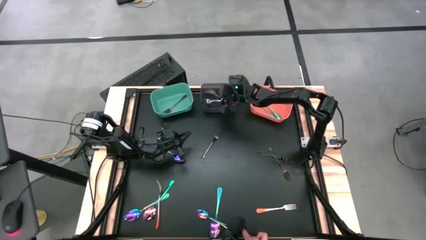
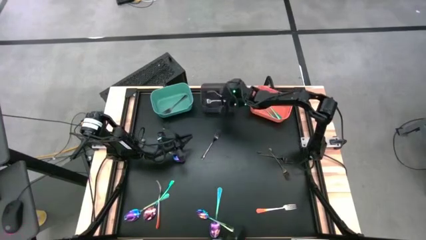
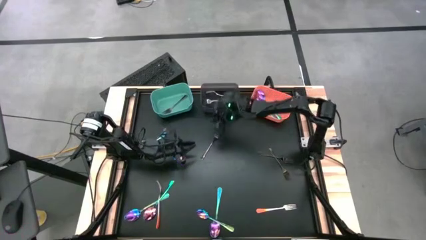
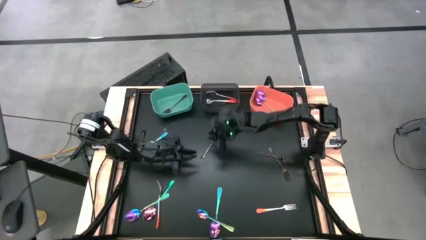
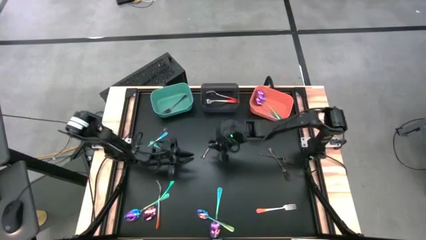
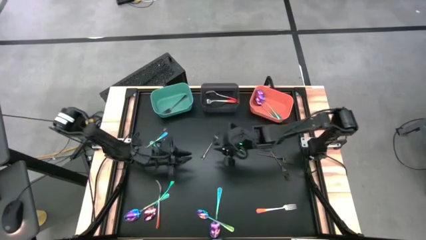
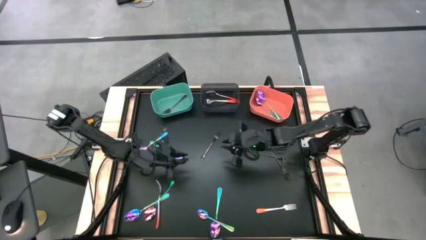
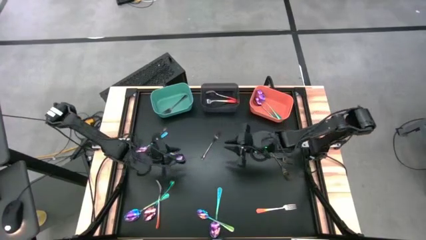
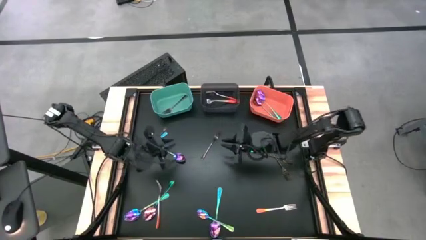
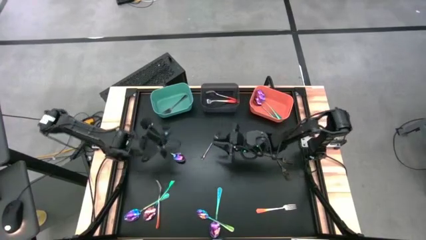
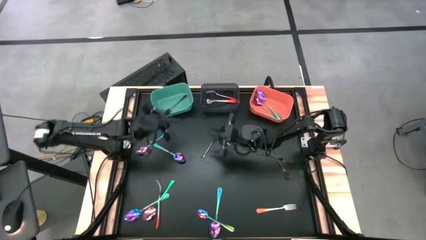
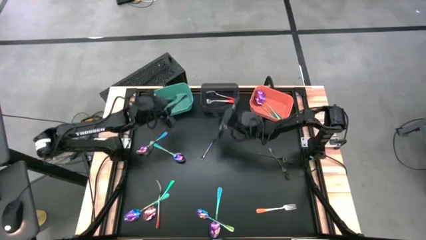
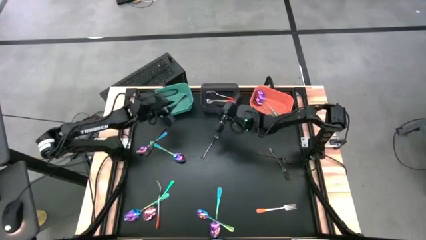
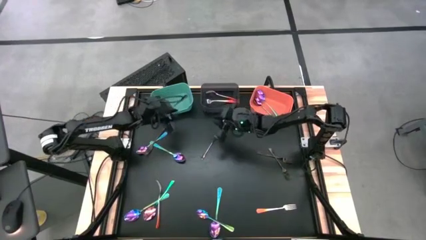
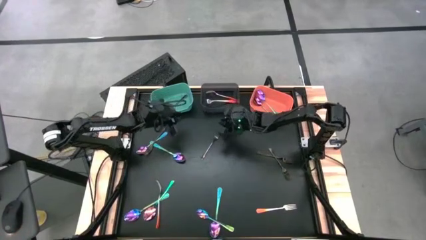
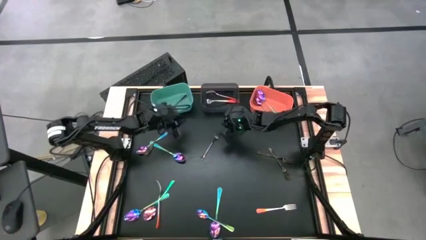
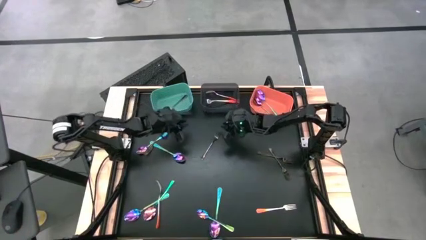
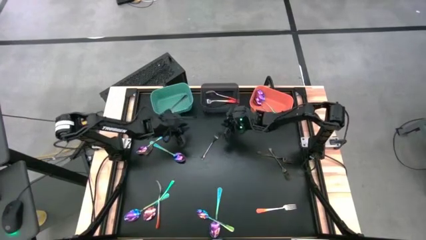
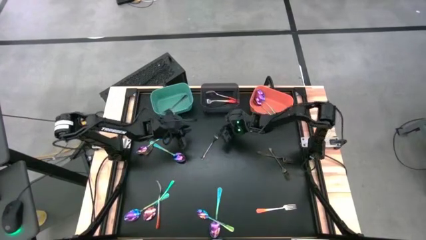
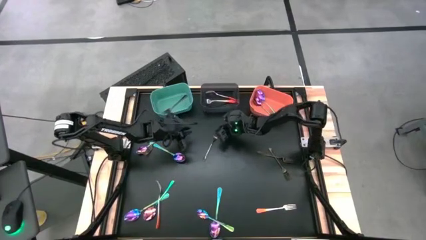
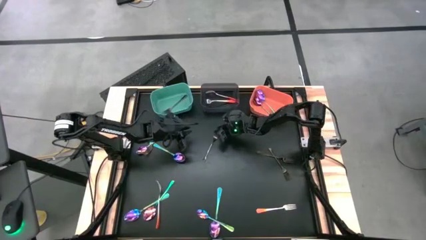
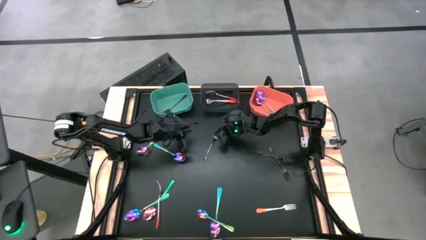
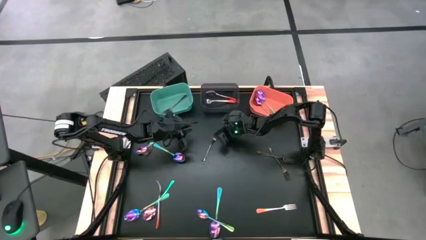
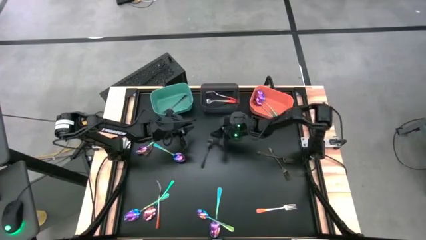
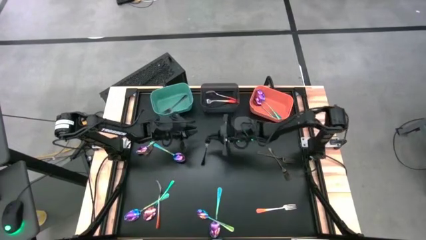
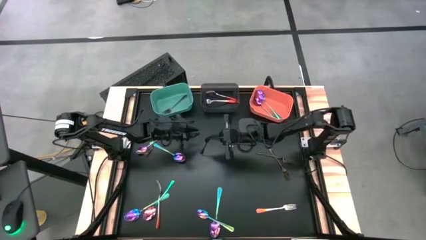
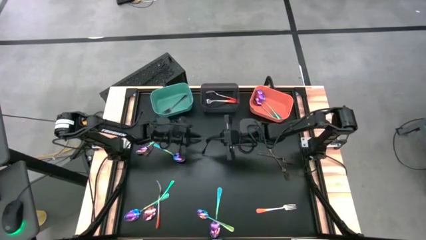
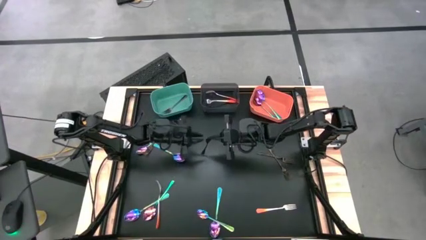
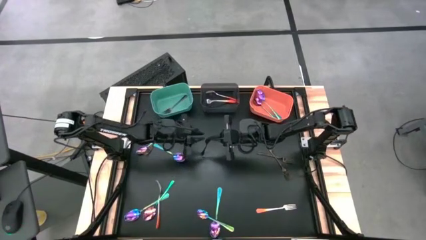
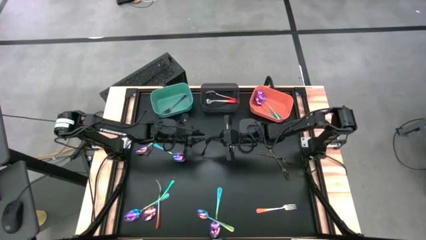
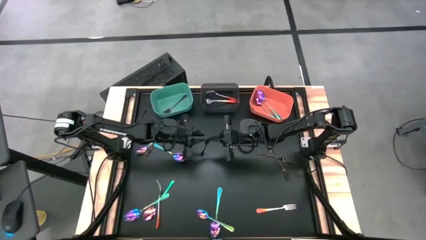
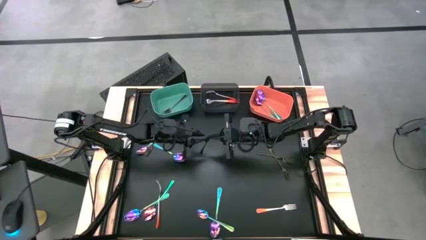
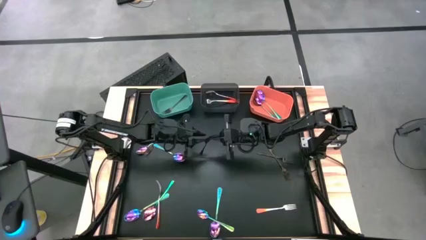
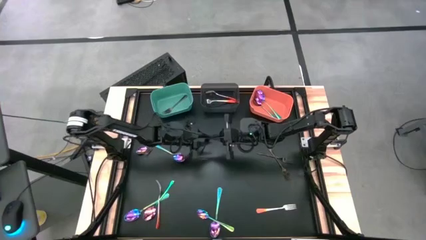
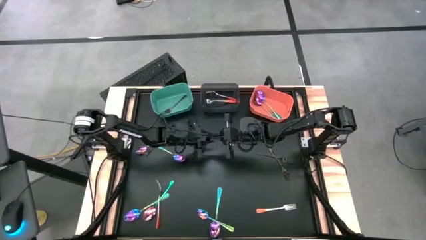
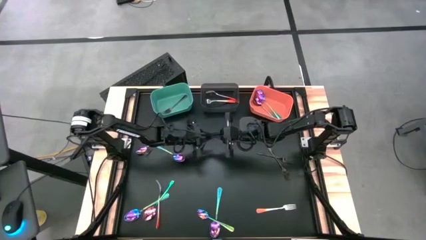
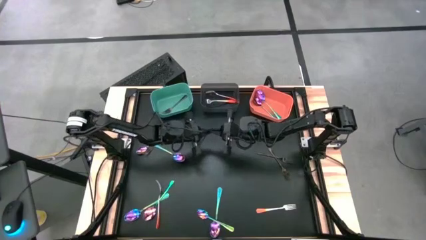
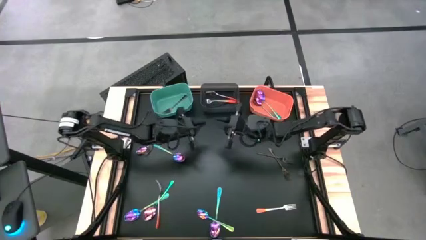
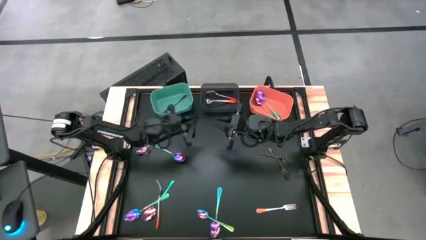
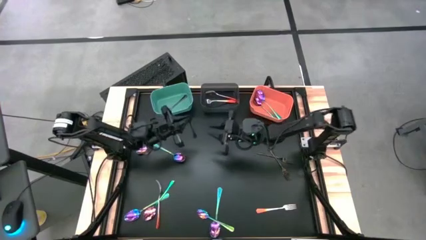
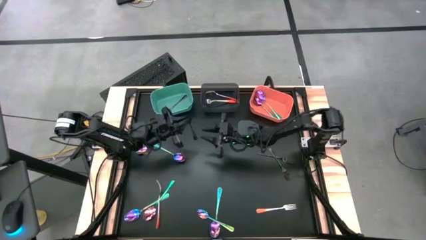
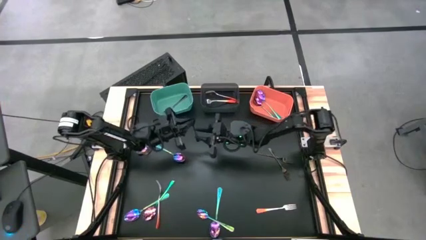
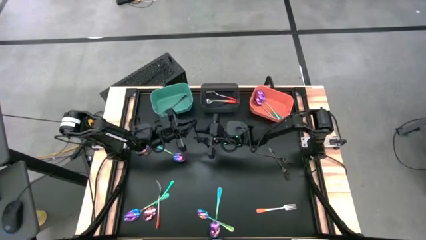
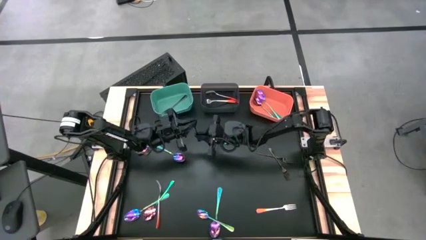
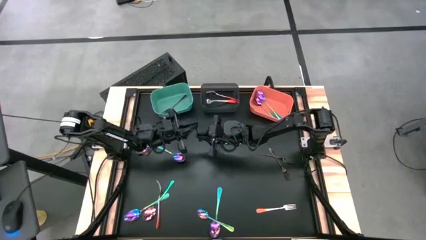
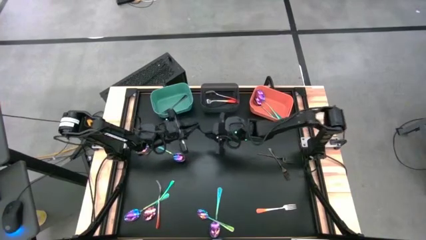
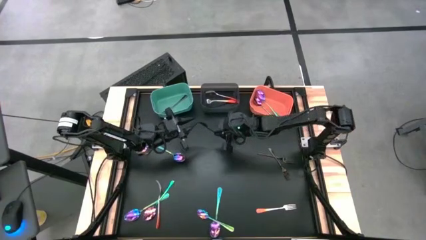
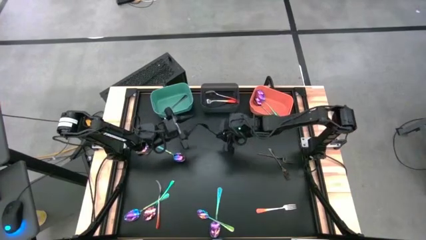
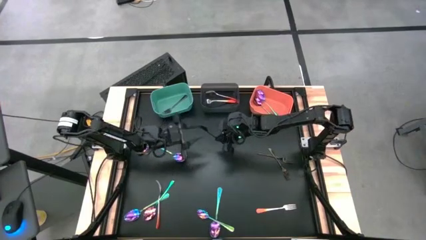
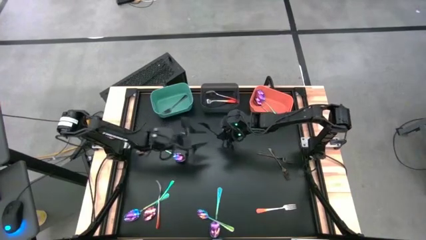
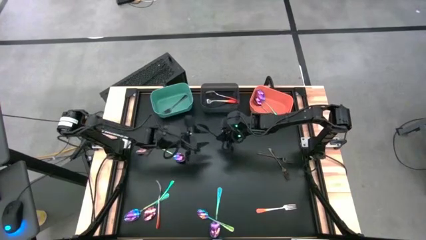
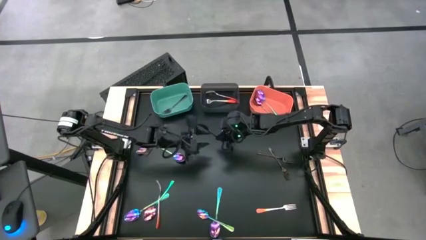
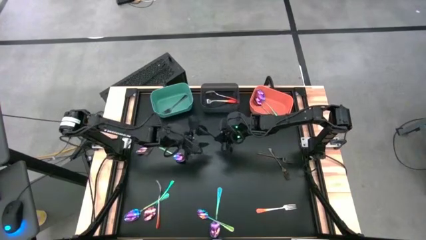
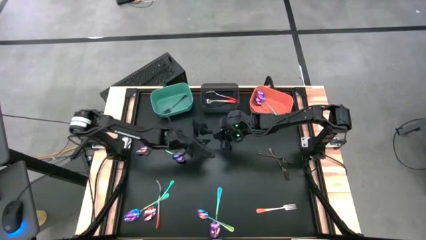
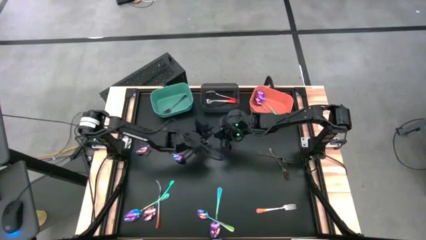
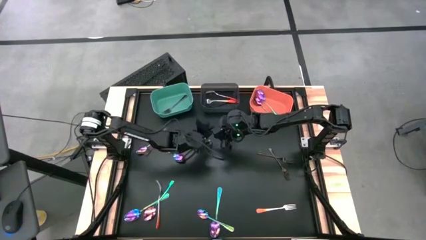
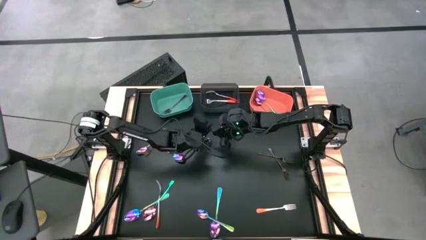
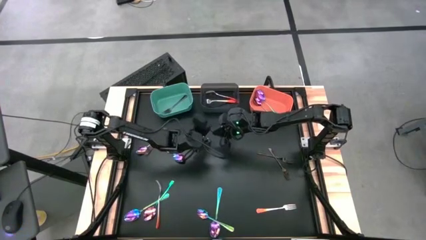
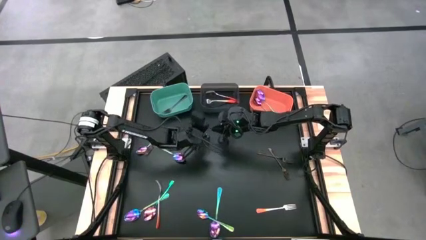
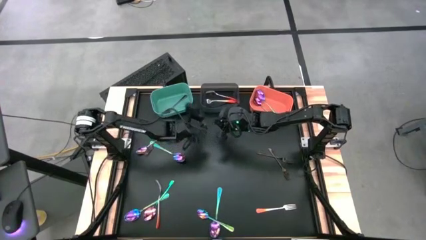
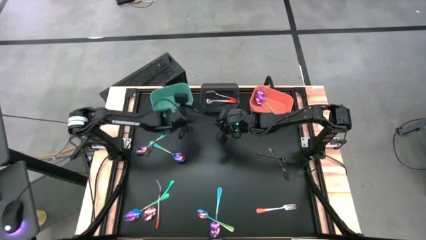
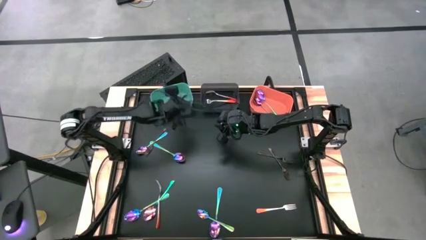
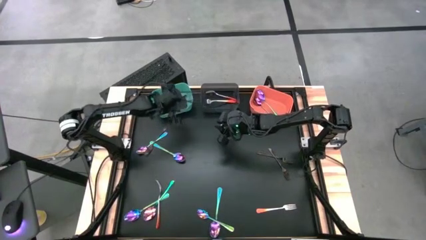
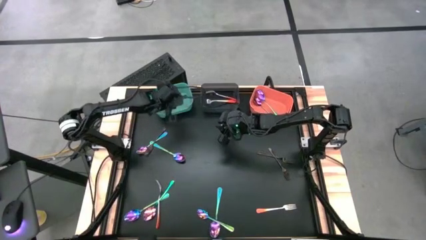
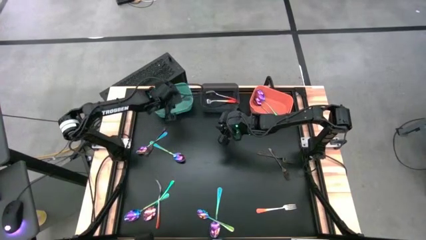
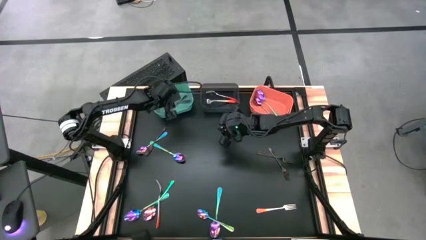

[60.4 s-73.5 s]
Task: Sort silverware by color (type)
Put the black fork into the green bin

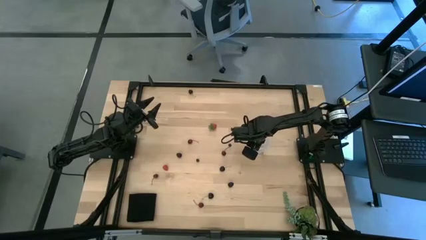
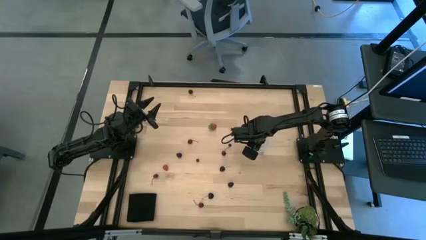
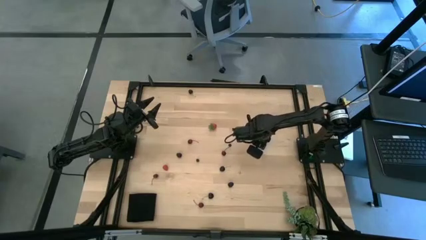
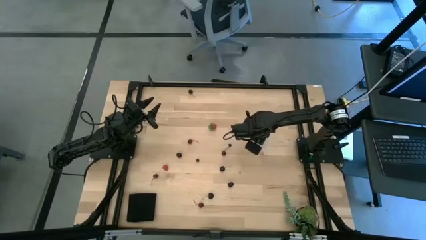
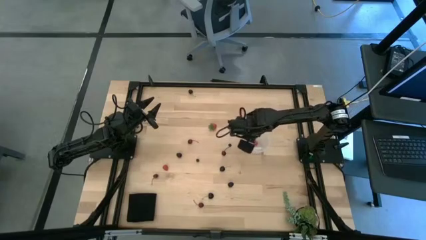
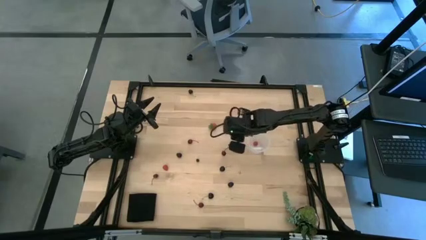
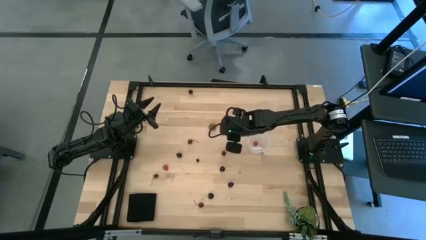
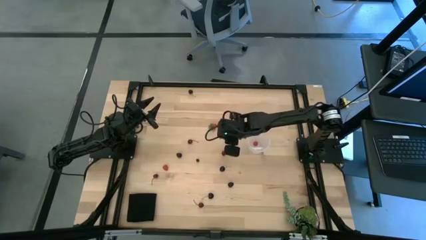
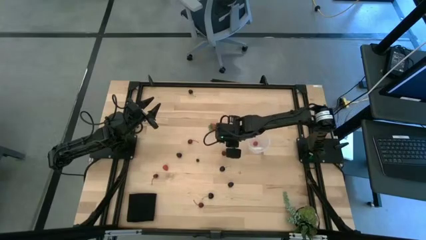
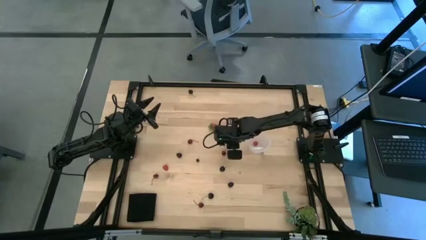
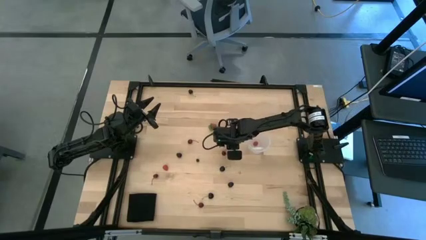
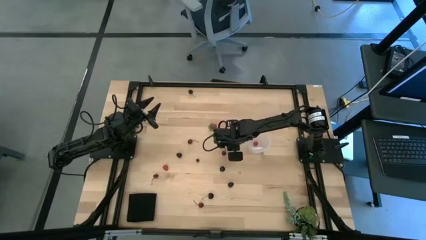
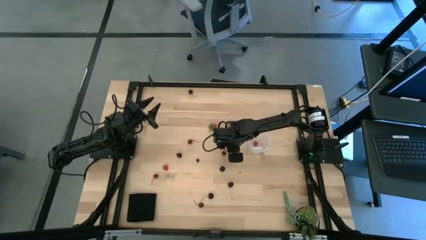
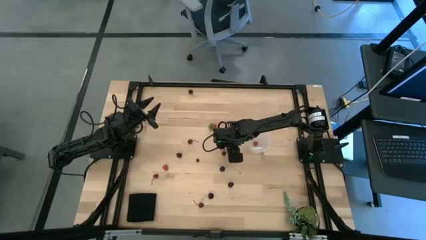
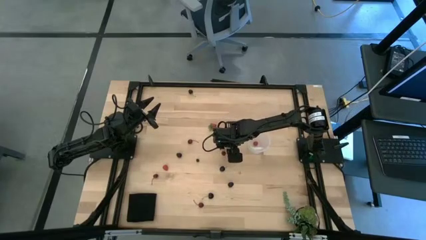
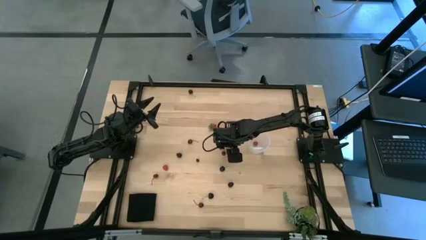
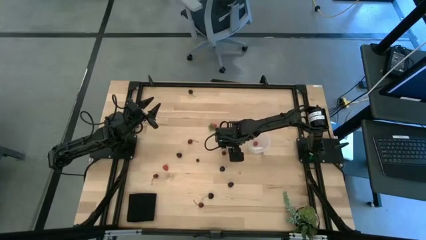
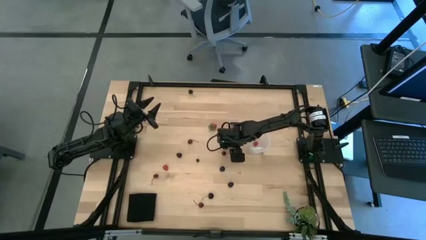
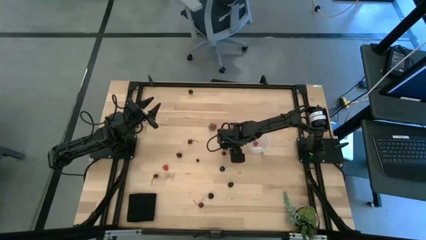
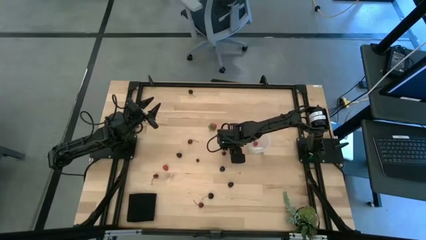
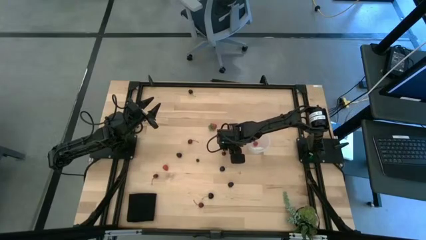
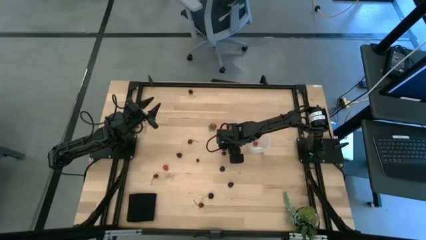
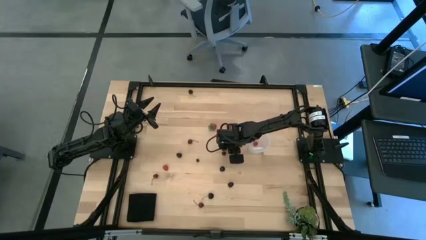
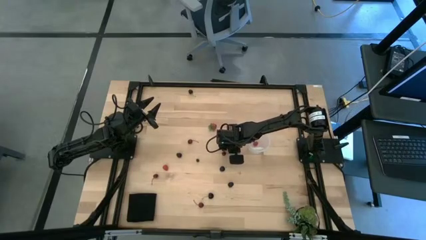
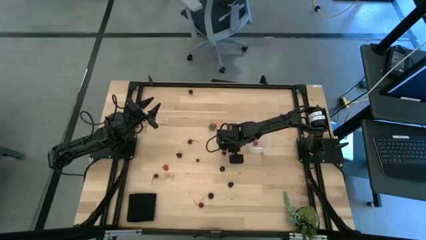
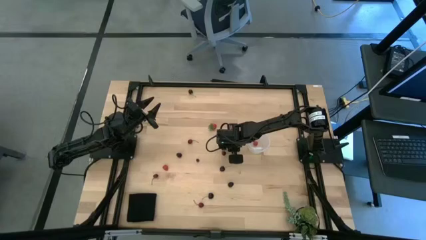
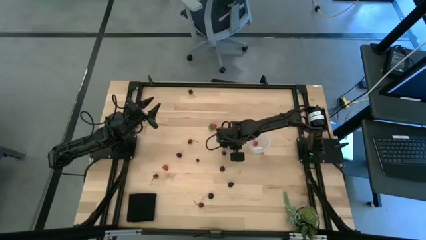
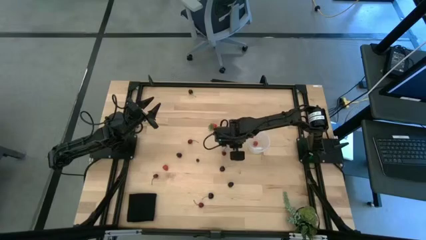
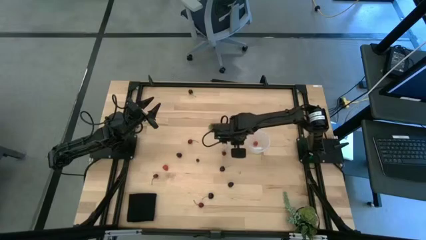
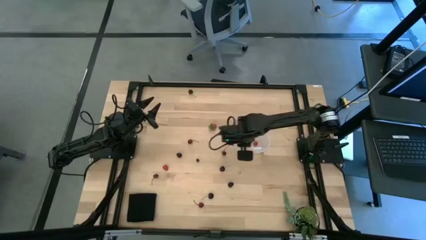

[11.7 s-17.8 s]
Task: Pick and placing Produce into tupperware
Put the blueberry into the transparent bucket
